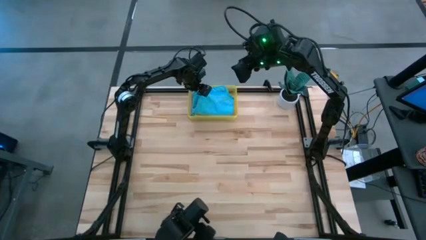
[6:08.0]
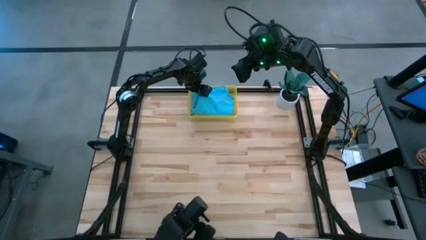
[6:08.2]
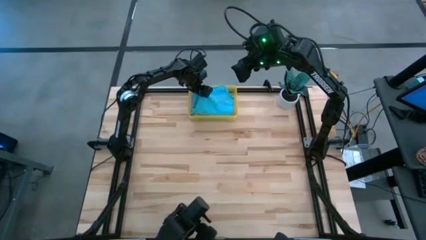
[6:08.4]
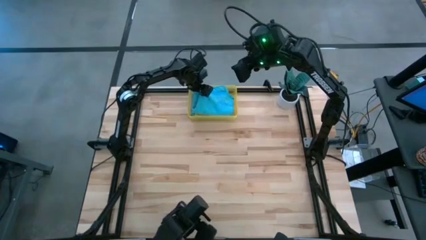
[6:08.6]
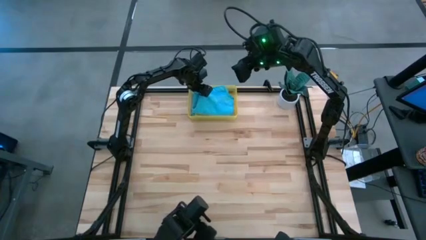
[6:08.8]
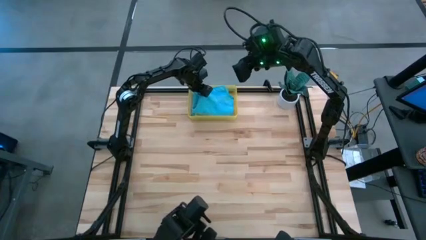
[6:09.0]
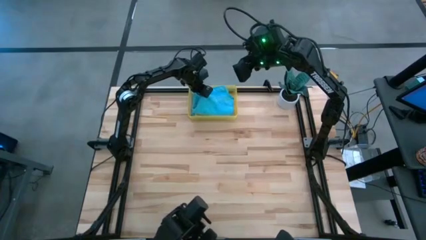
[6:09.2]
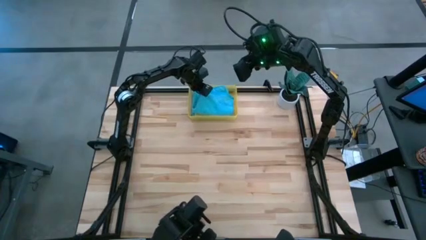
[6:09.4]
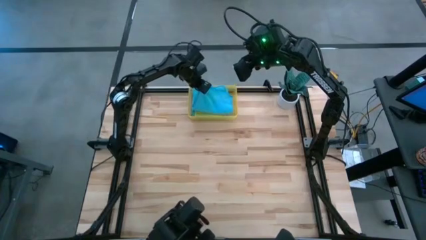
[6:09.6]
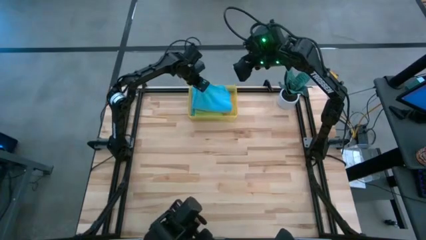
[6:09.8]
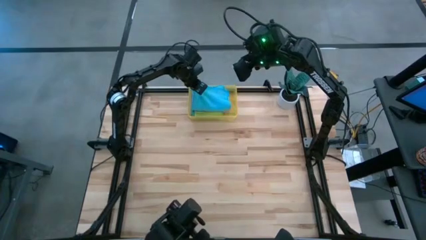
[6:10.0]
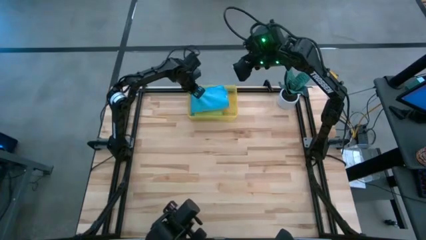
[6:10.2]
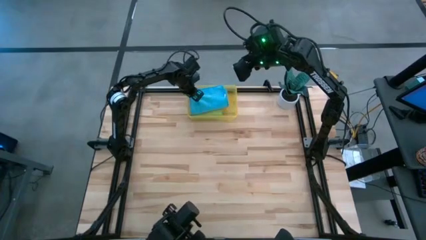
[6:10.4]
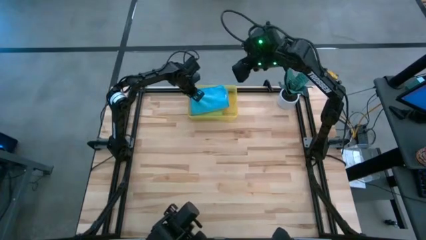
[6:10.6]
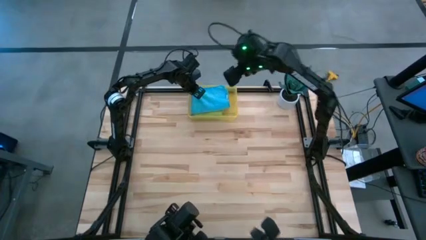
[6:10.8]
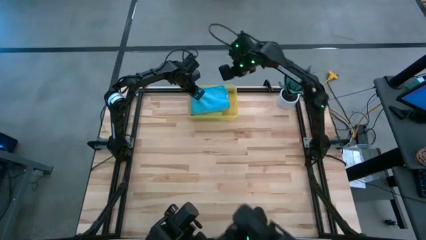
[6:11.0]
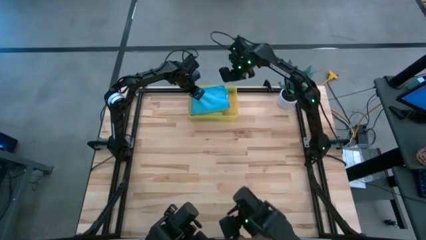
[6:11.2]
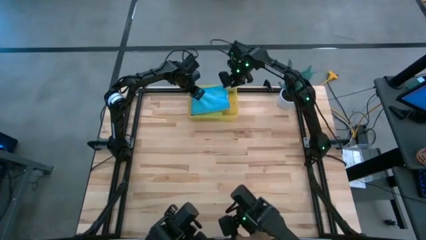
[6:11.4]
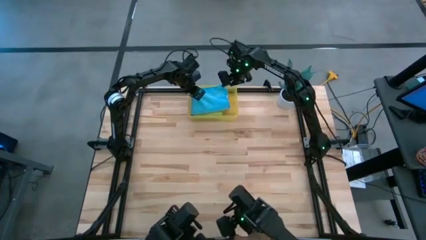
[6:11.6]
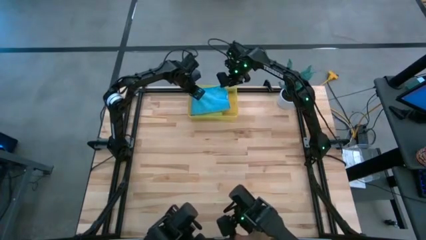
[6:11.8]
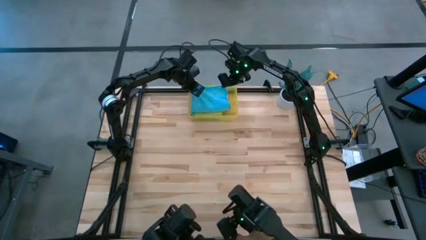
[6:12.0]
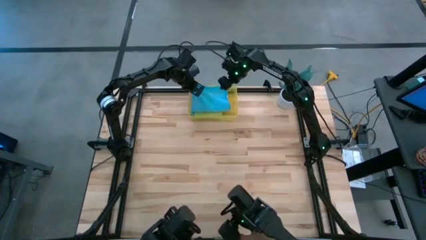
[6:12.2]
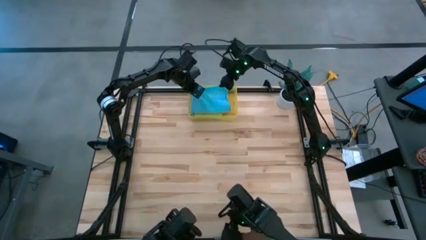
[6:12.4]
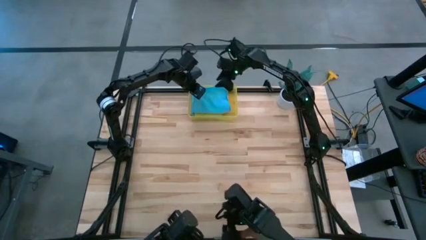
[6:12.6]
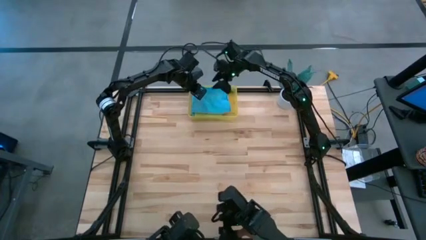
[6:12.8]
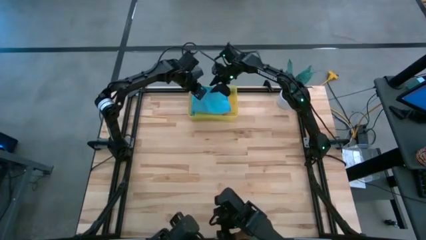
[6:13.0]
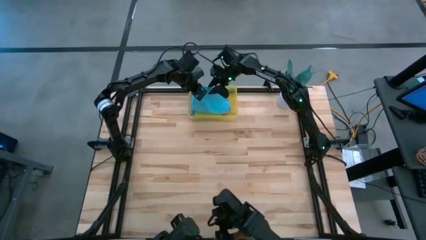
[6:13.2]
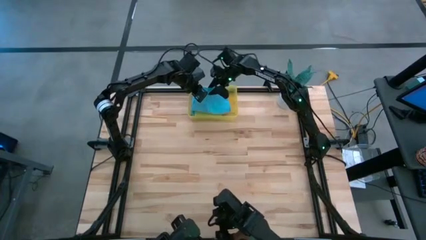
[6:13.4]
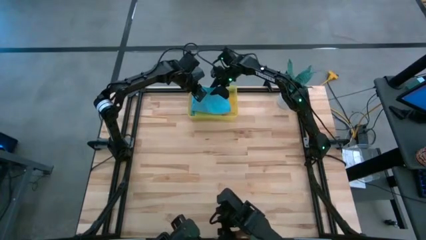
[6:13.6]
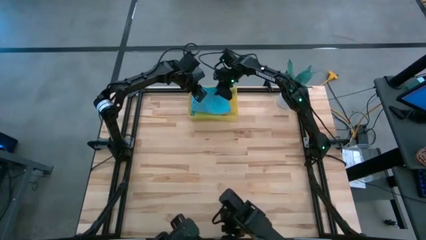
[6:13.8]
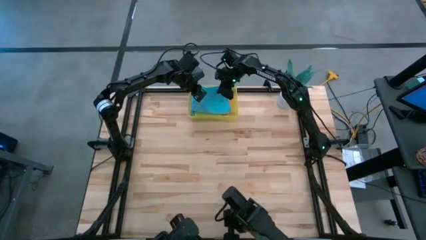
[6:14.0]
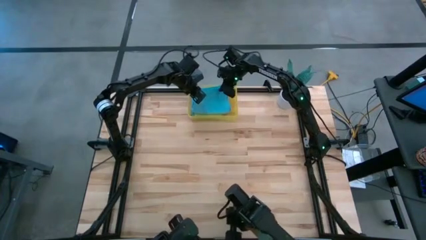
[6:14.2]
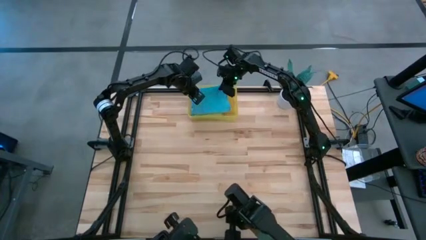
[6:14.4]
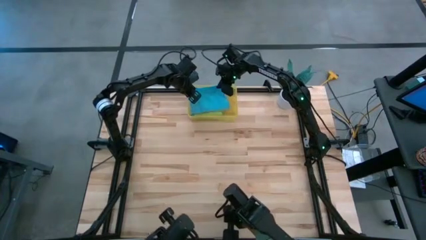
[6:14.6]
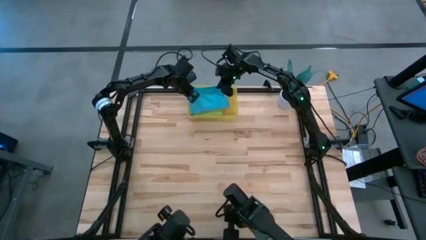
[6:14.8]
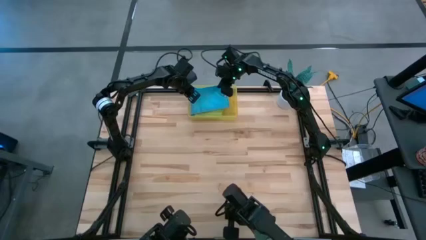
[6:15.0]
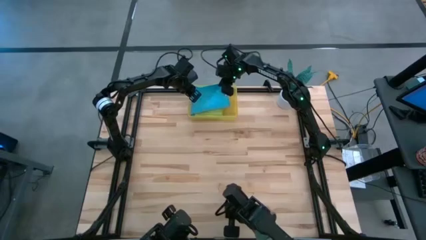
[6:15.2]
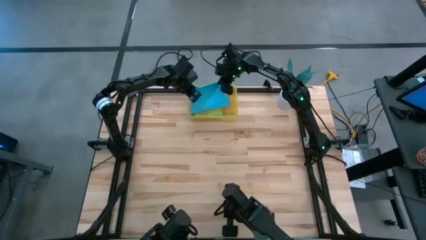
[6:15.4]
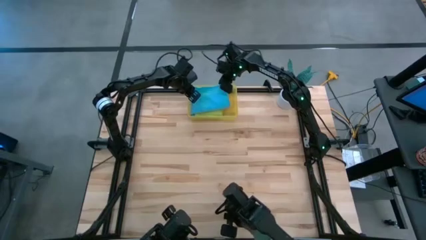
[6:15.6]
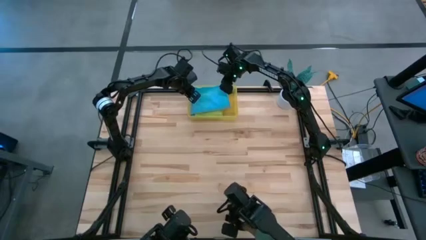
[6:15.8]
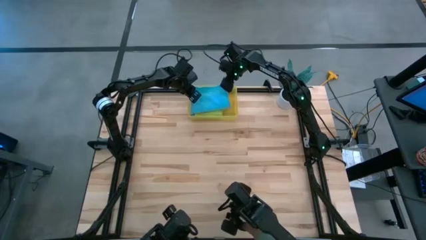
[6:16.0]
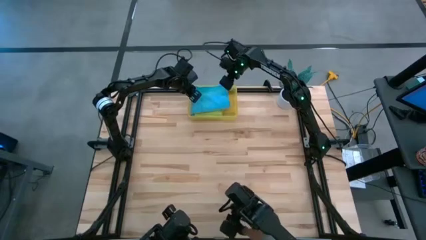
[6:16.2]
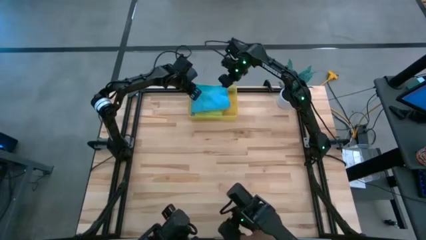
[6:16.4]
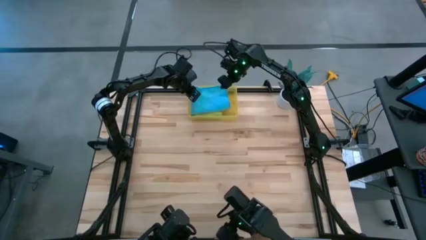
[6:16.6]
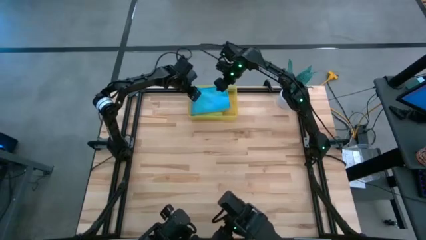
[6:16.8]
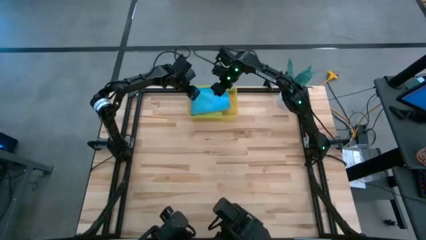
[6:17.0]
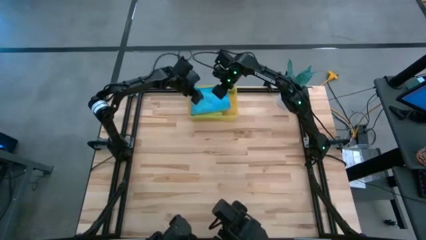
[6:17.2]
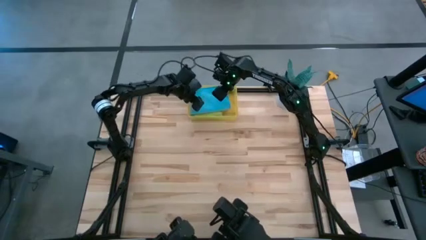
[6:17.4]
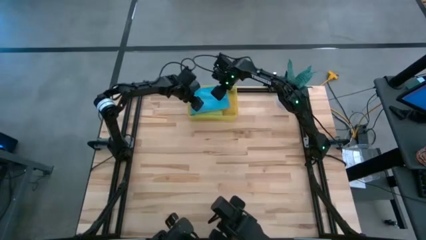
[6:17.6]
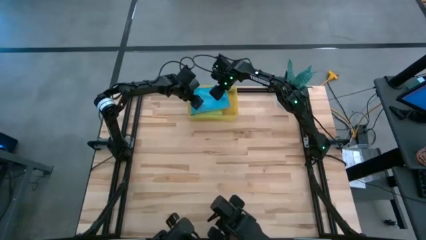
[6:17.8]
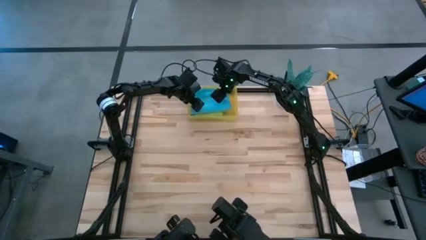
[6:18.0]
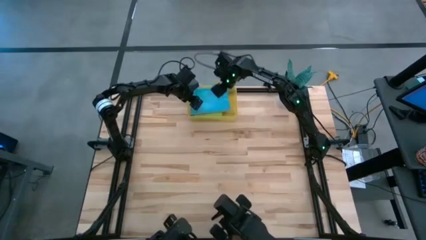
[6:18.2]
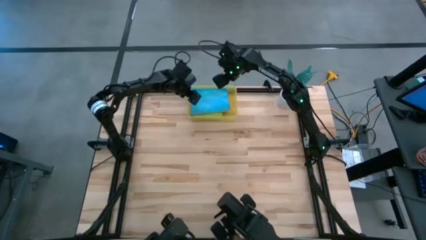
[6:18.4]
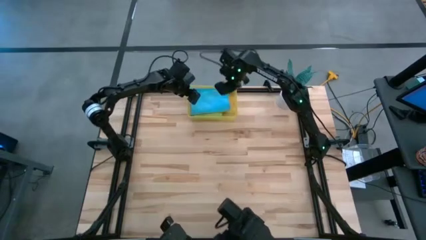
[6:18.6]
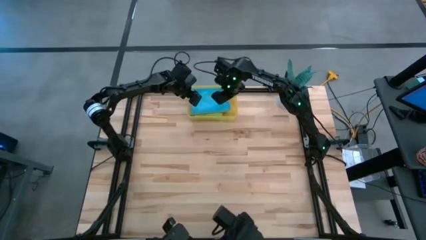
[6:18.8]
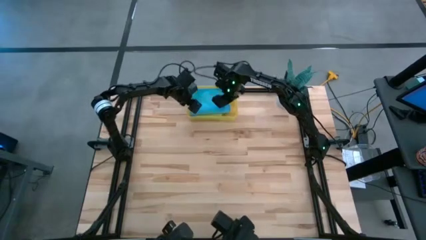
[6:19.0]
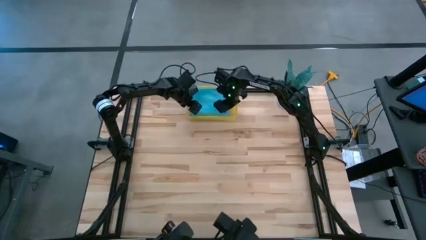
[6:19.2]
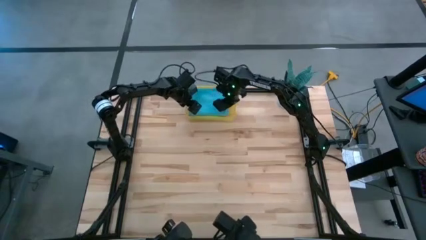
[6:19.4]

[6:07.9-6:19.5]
Task: Fold microfiber towels
Stack the blue microfiber cloth on the green microfiber cloth in the yellow bin

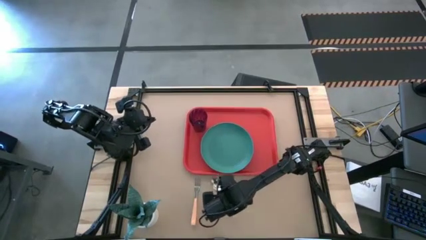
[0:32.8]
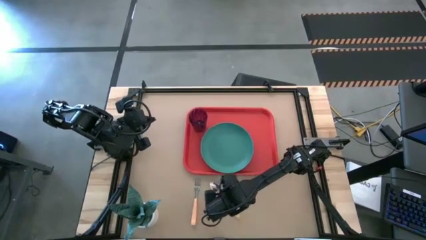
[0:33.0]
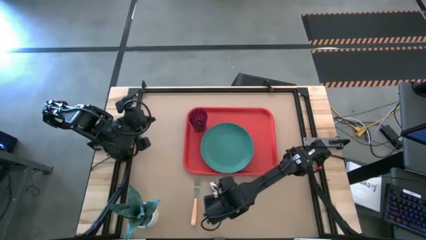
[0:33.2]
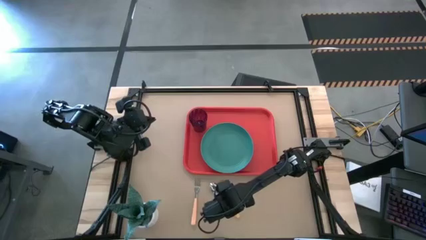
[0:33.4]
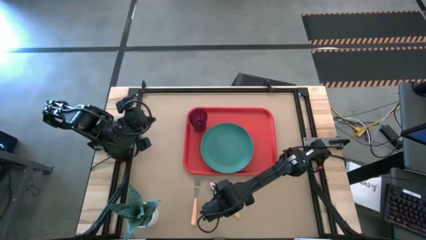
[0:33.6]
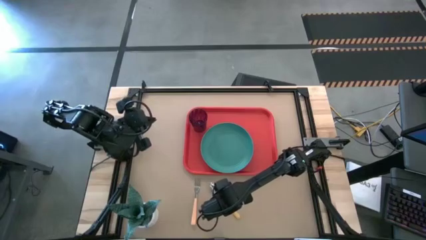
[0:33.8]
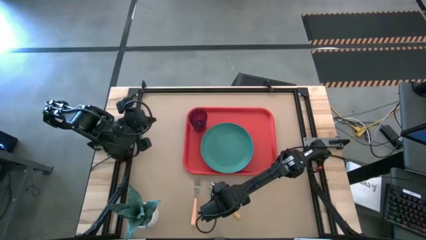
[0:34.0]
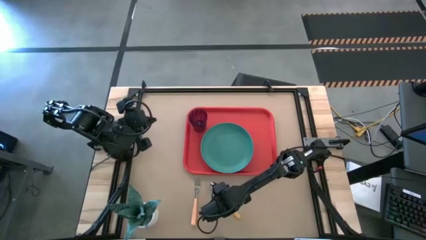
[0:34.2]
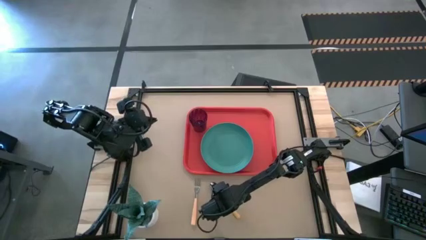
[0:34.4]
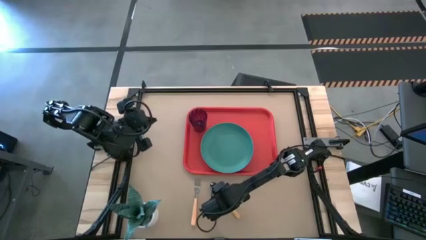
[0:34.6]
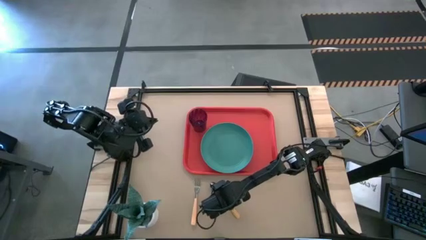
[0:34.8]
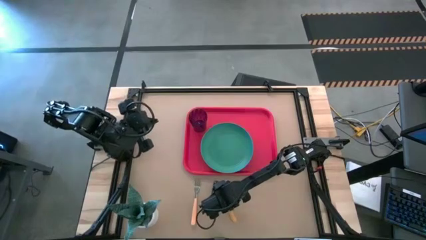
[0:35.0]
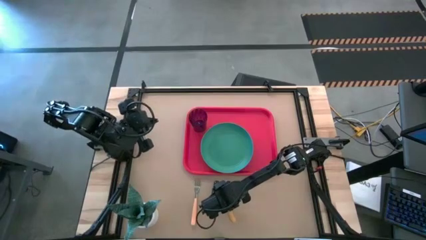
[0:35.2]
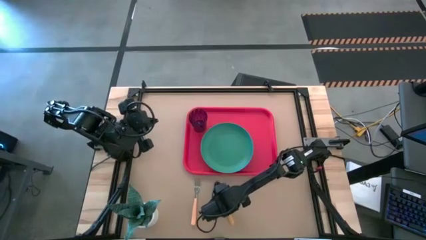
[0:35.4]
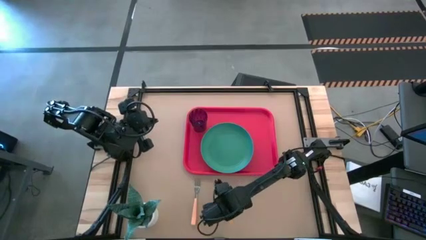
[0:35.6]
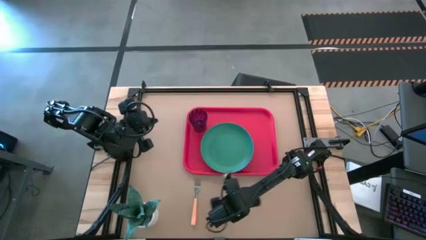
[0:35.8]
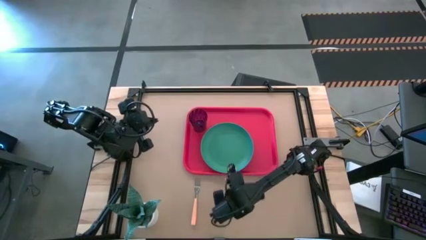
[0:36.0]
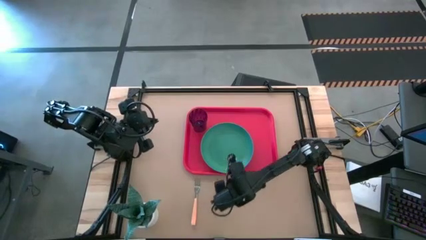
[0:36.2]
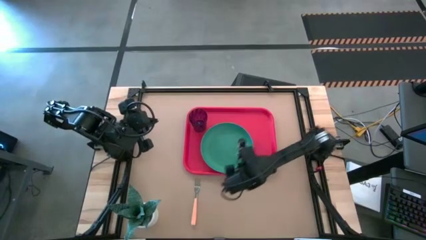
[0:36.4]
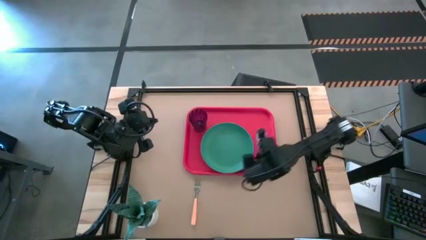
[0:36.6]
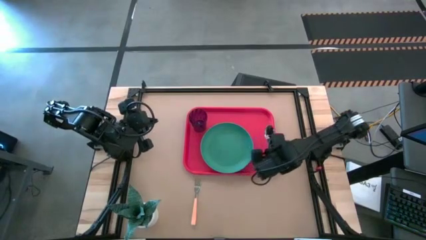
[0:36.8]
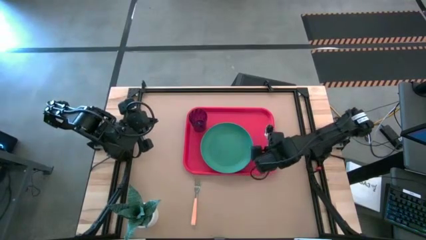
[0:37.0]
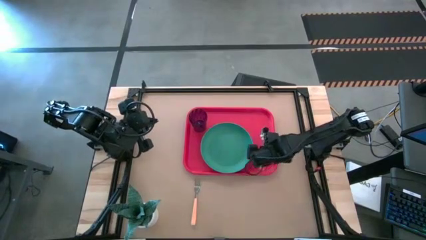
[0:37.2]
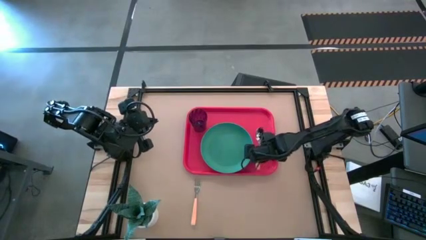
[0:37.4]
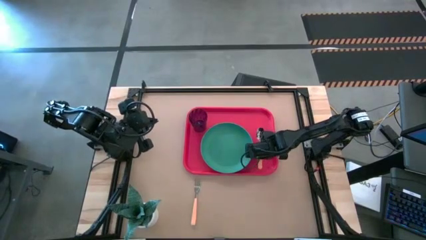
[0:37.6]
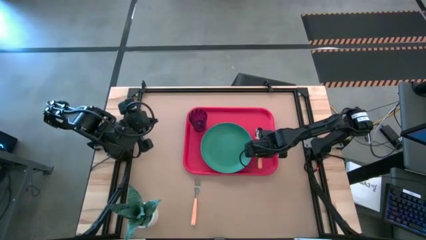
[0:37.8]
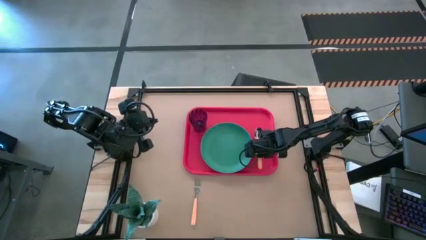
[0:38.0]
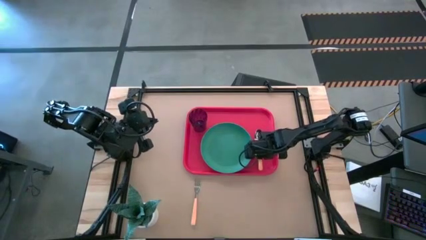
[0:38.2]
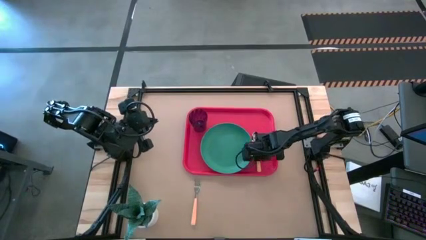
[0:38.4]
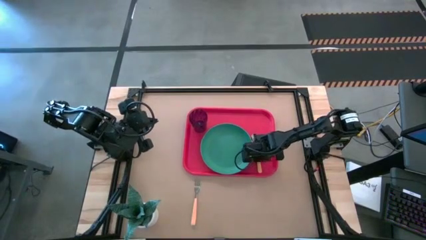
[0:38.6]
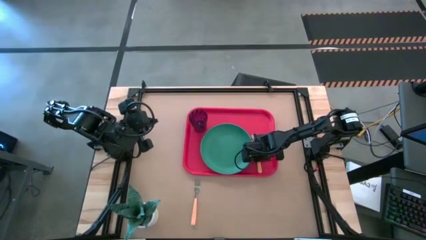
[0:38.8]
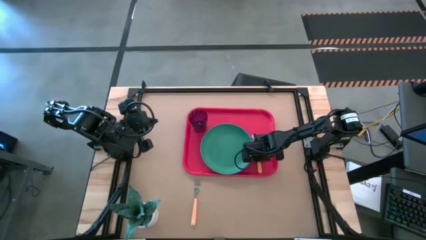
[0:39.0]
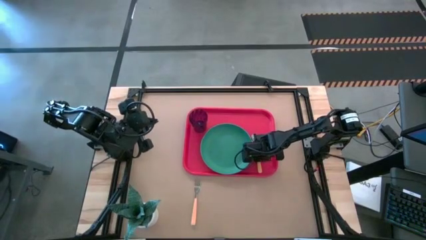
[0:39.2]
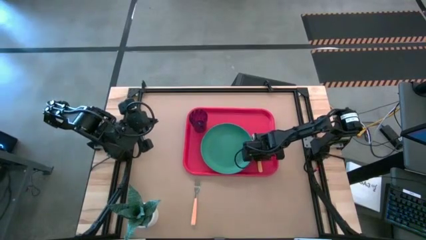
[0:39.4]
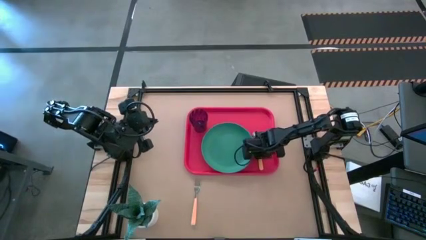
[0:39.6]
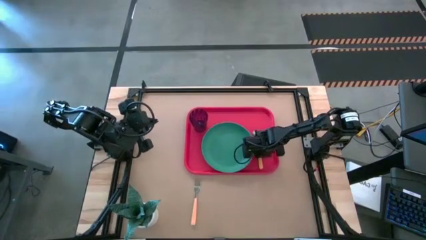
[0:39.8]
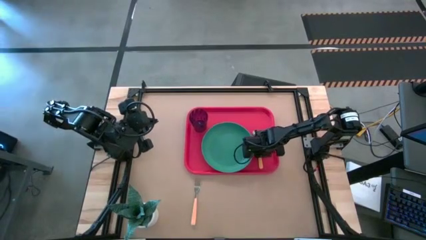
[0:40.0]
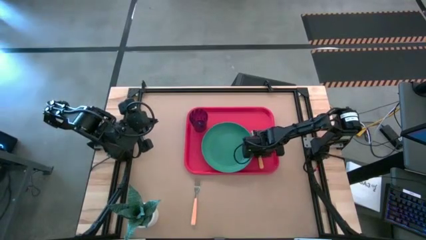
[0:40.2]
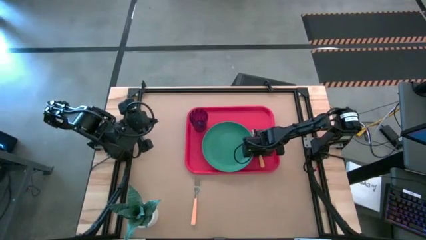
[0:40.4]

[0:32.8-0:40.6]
Task: Pick and place plate/cup/fork/spoon on tray
Put the yellow spoon beside the green plate on the red tray
